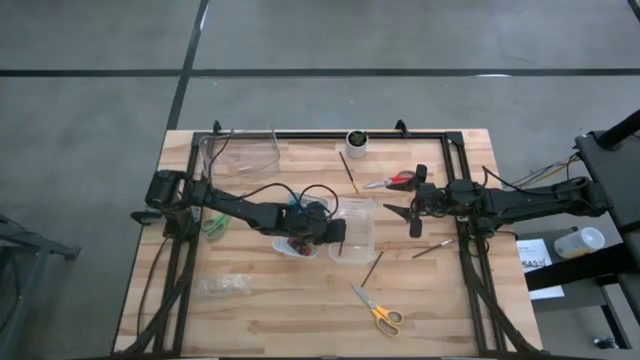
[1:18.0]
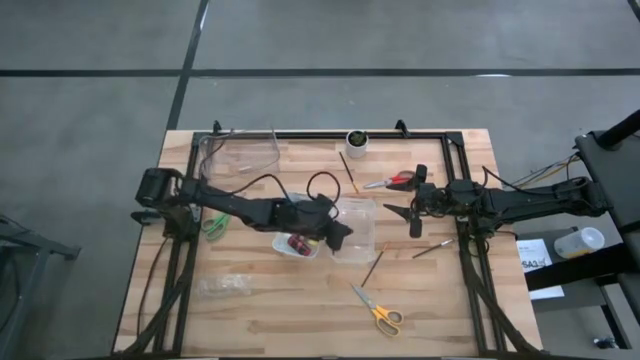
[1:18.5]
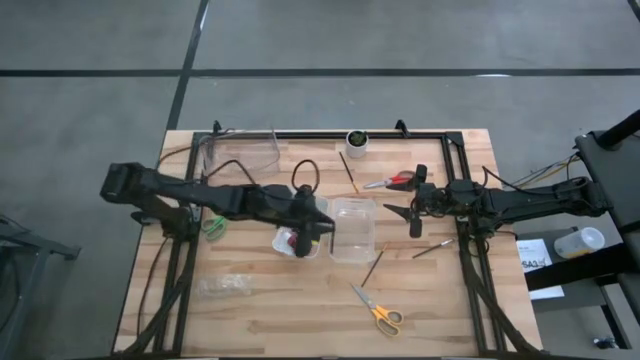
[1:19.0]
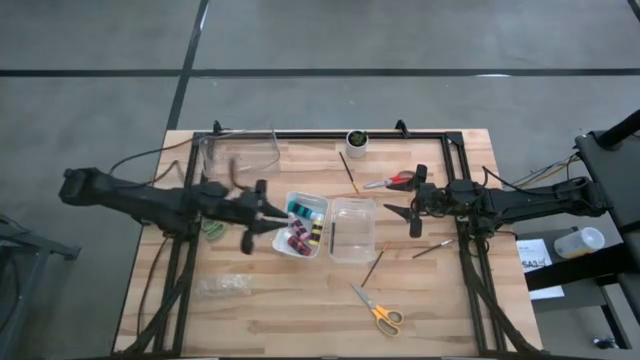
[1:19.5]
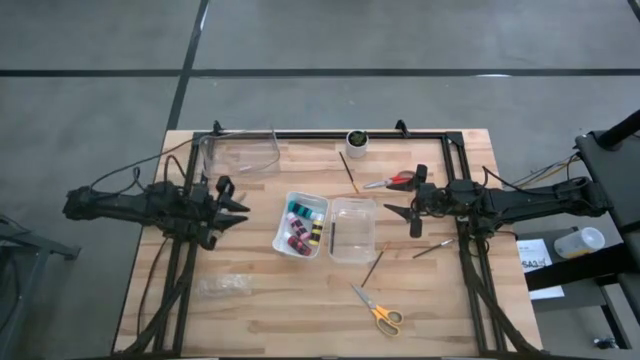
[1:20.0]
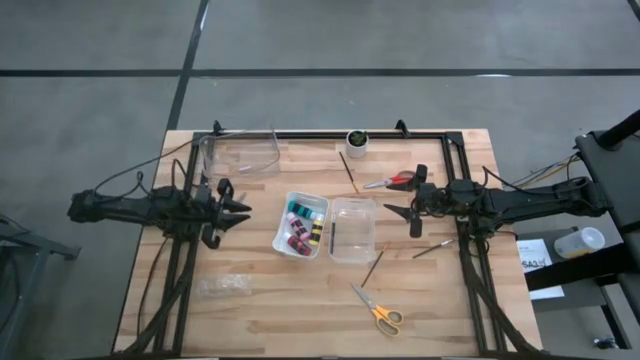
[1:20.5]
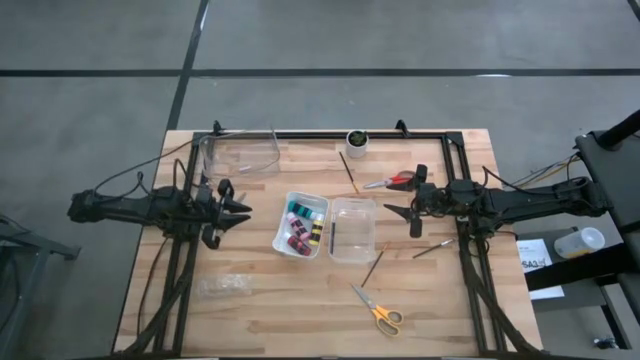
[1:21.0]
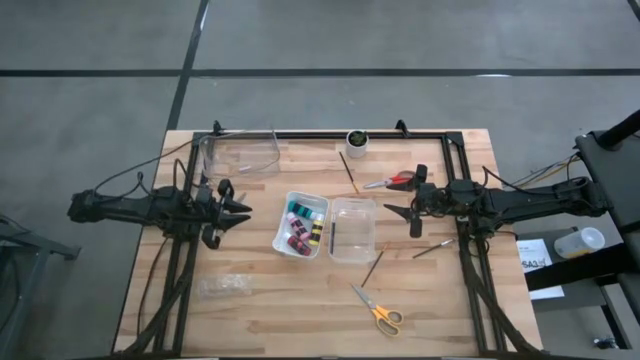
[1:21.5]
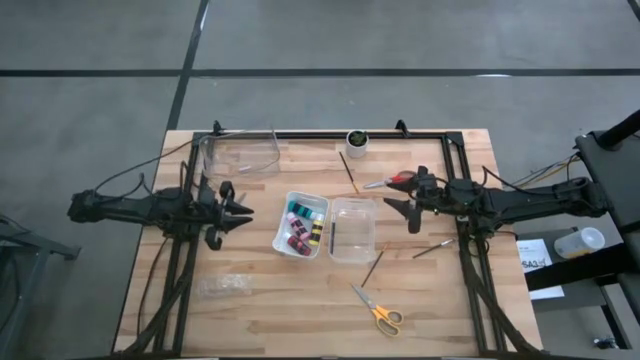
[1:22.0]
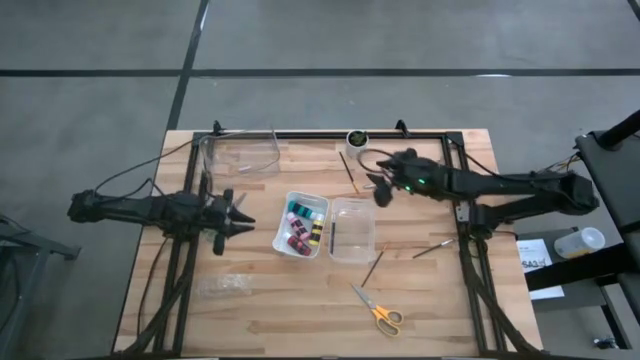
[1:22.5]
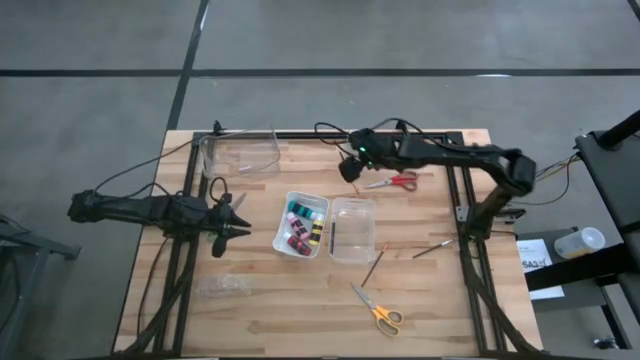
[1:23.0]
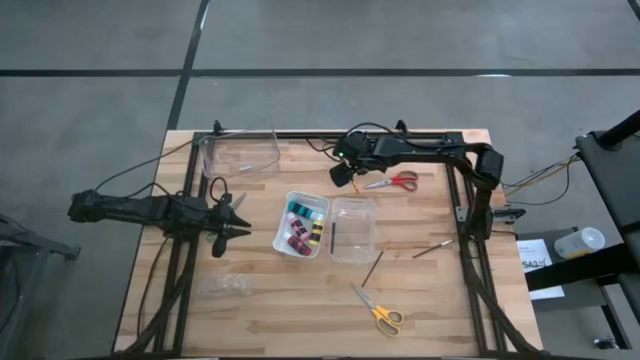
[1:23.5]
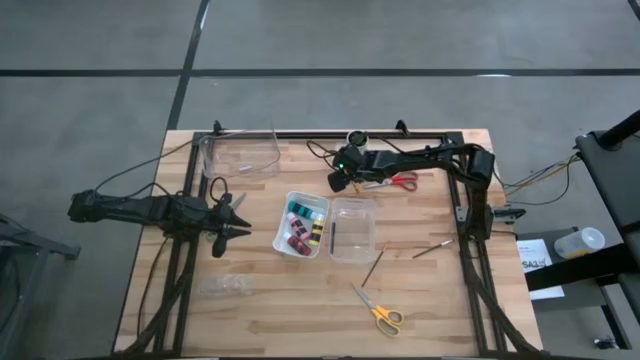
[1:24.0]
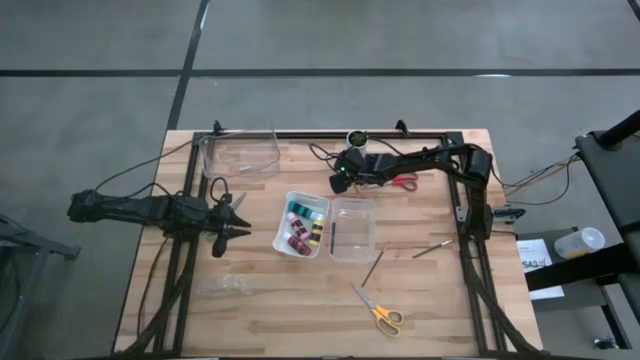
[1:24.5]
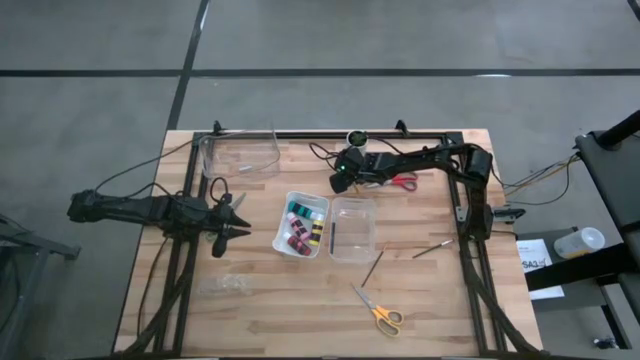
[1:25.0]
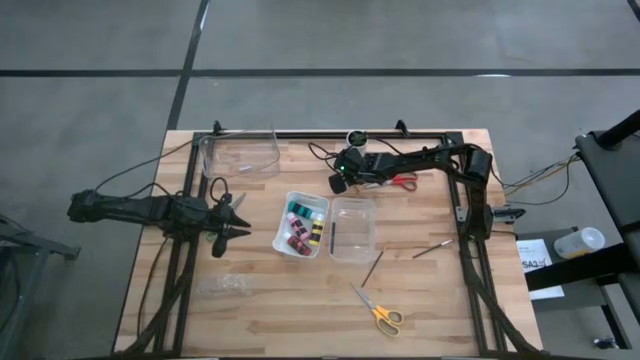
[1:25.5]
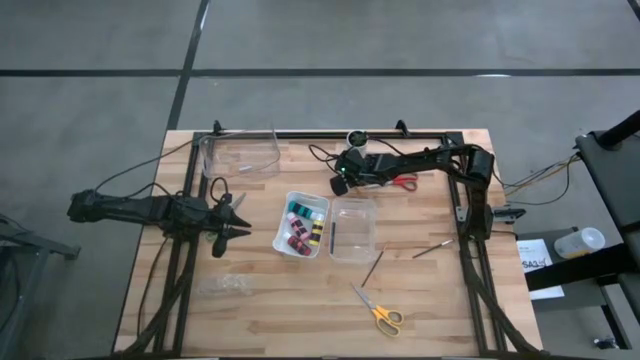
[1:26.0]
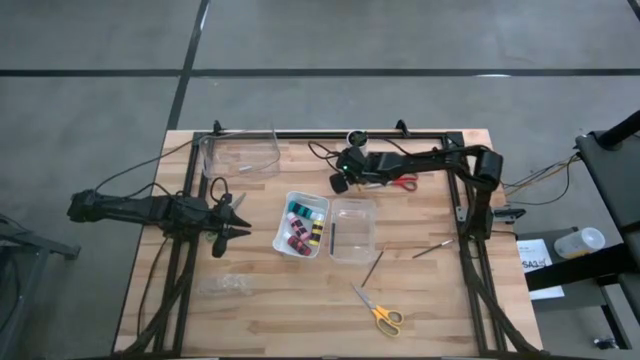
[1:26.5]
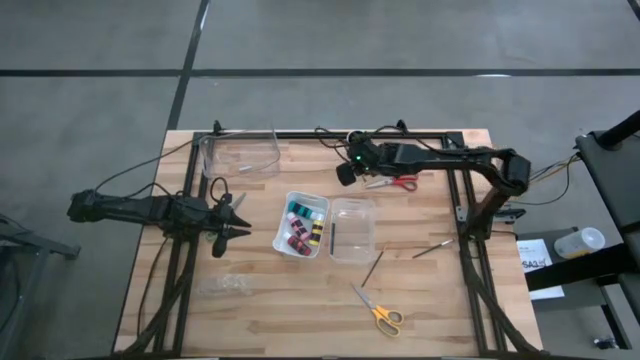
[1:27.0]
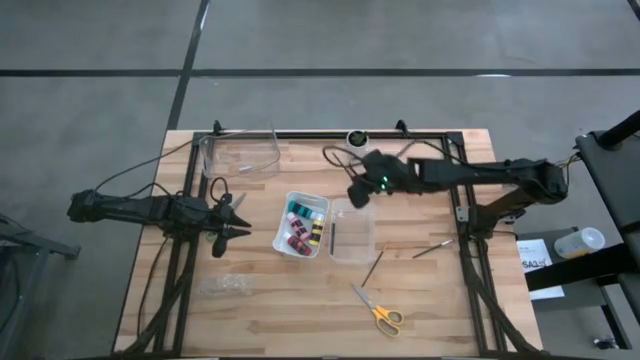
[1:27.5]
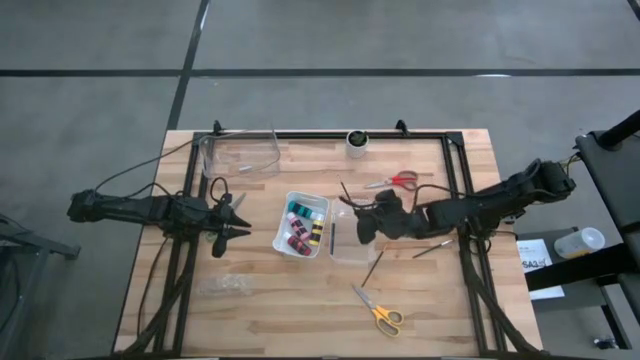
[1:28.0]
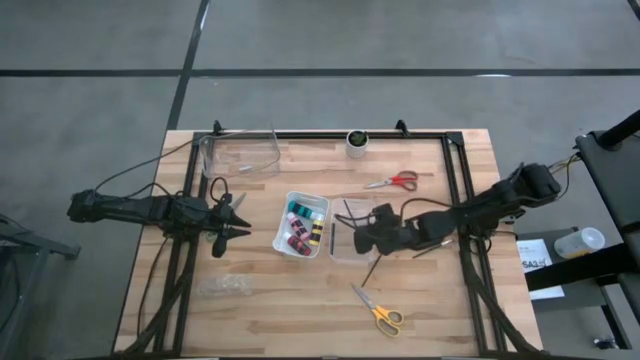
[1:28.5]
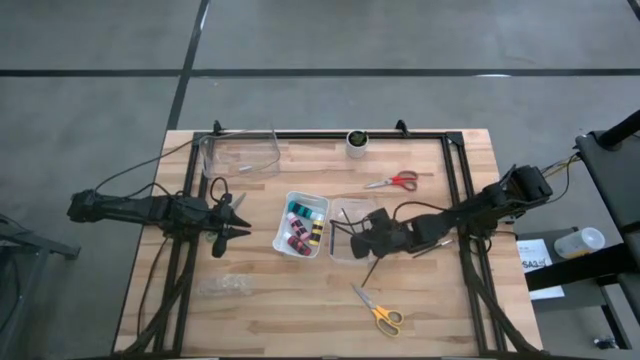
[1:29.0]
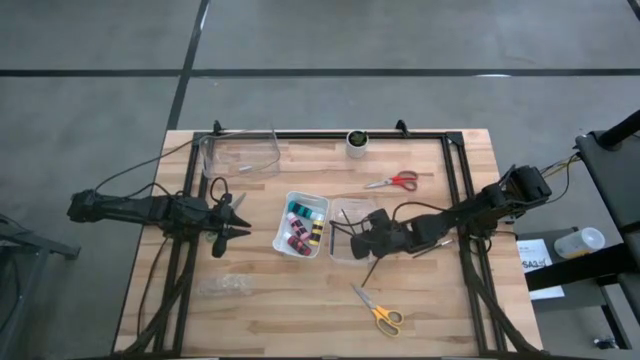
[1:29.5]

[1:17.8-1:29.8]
Task: Pick & Place Paint Supplies
Put the yellow paint brush into the bottom transparent bin

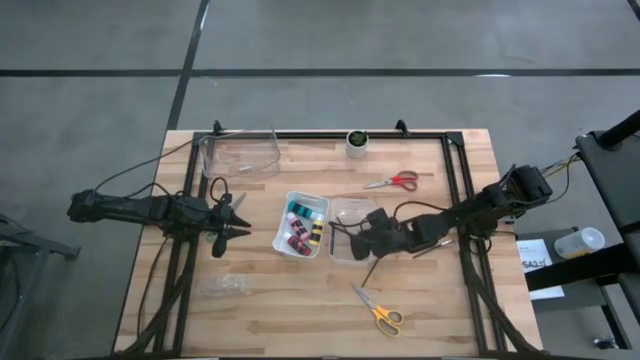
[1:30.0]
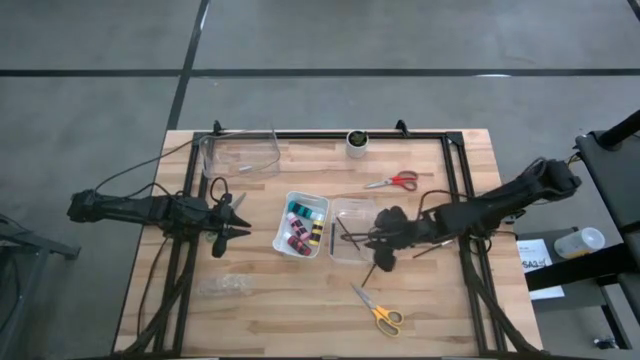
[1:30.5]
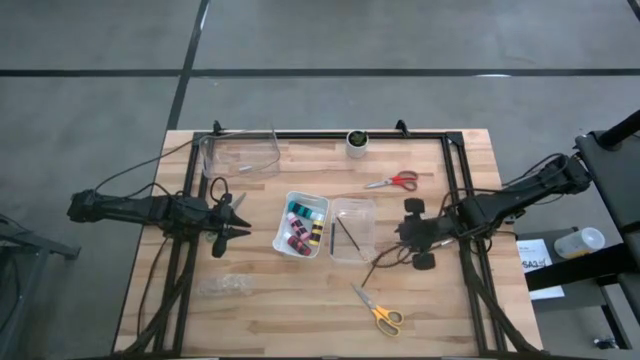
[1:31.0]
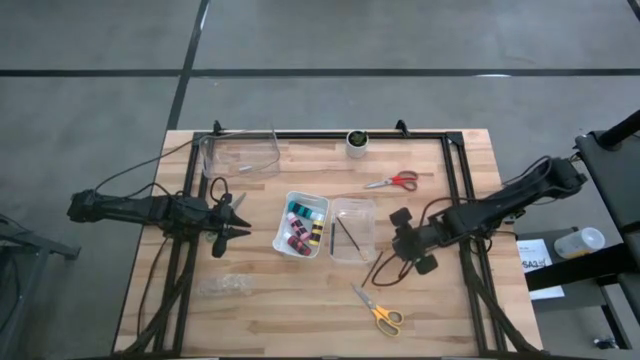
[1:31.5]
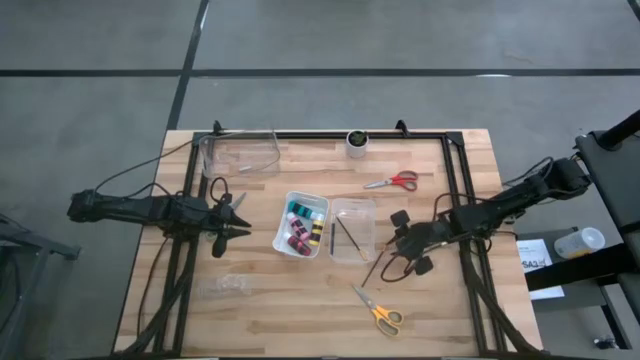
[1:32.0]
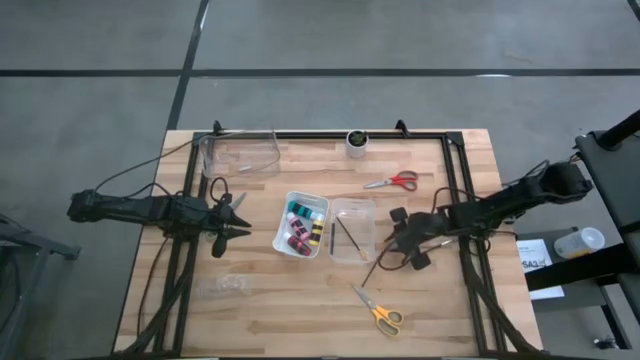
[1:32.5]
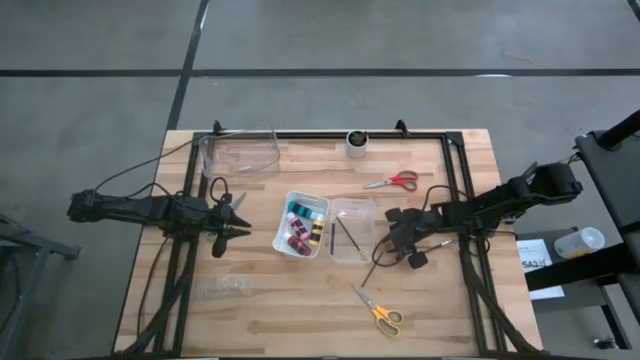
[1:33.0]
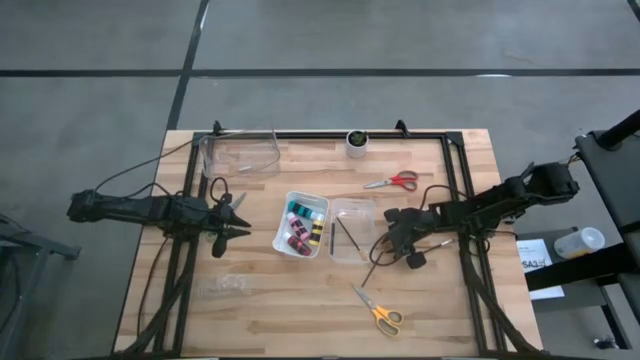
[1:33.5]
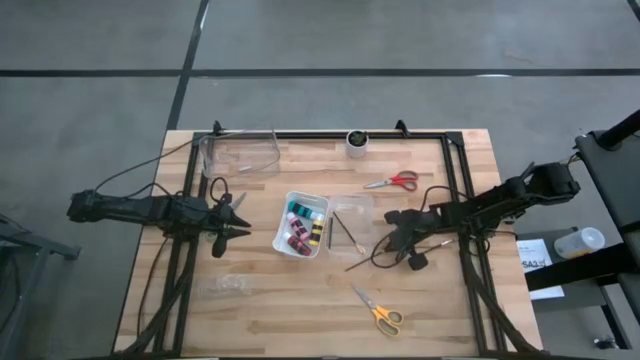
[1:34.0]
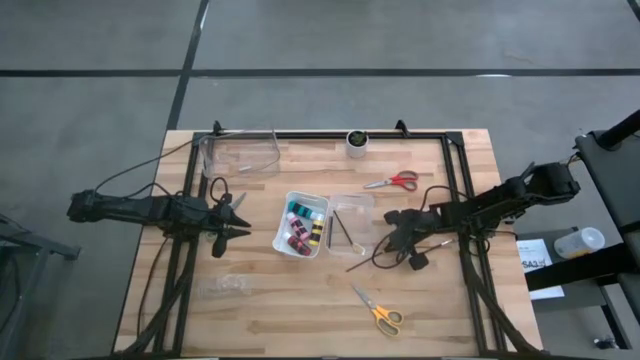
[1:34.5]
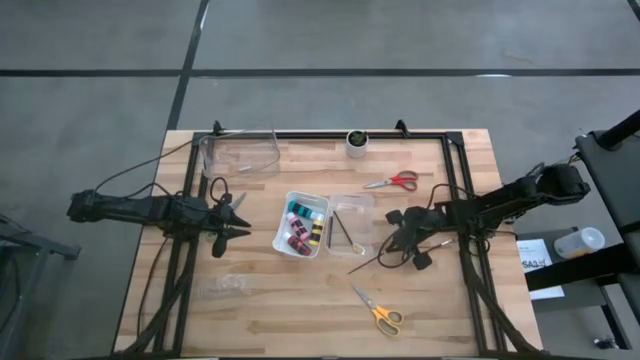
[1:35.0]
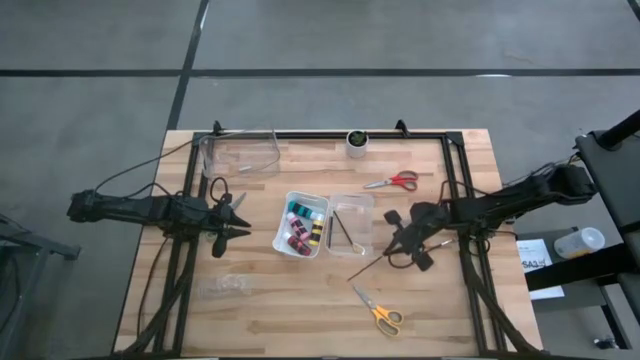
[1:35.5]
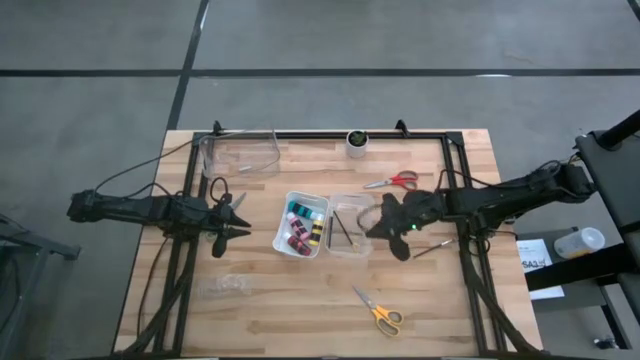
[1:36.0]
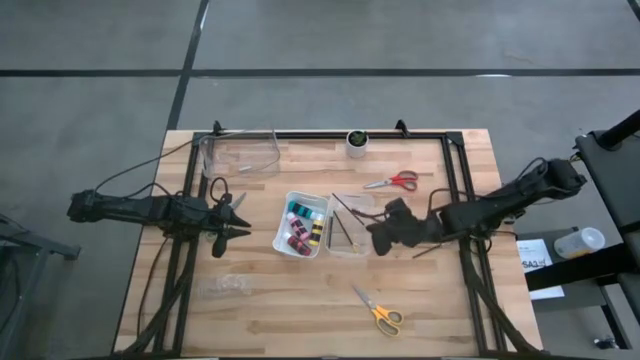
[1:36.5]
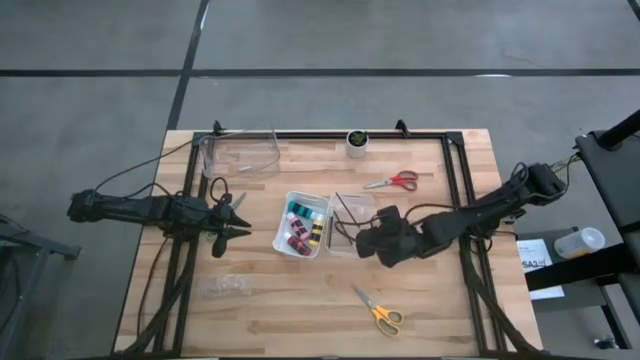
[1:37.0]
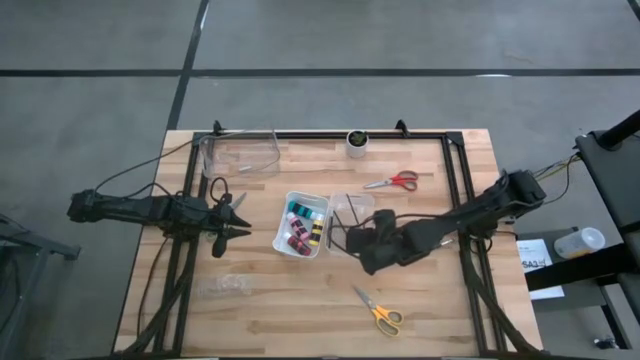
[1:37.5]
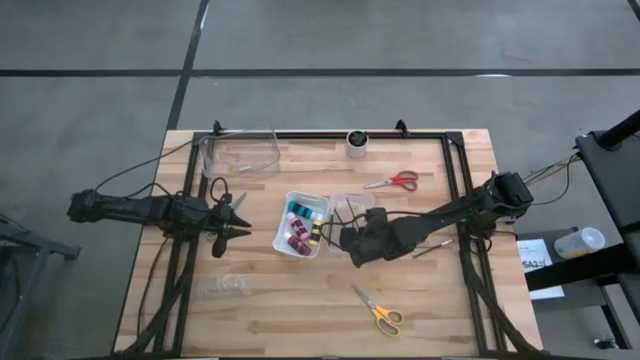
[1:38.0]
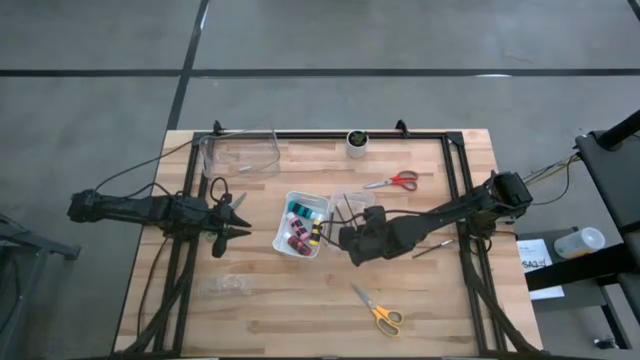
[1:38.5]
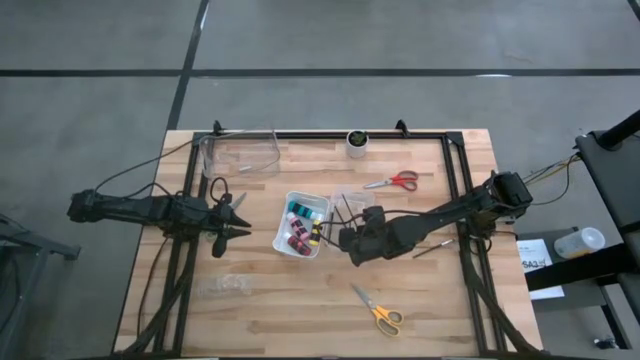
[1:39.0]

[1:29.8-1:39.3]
Put the yellow paint brush into the bottom transparent bin
